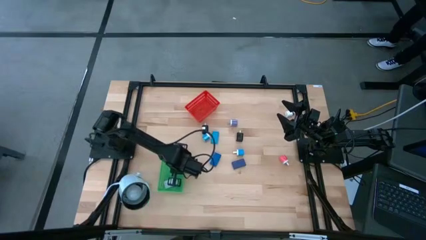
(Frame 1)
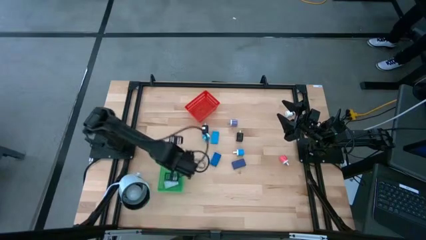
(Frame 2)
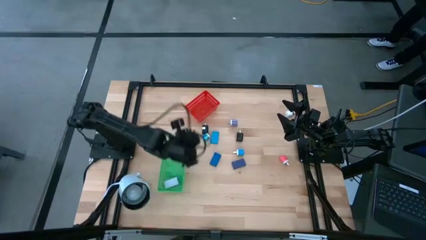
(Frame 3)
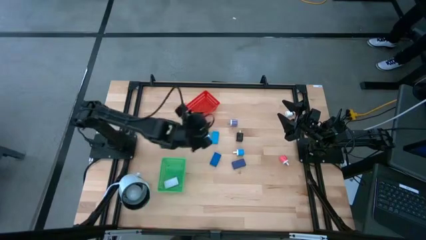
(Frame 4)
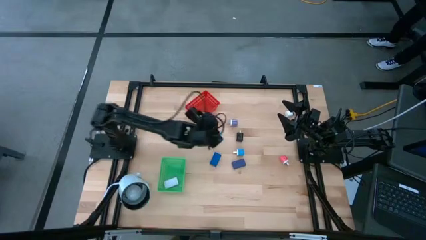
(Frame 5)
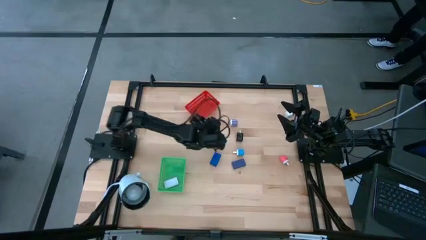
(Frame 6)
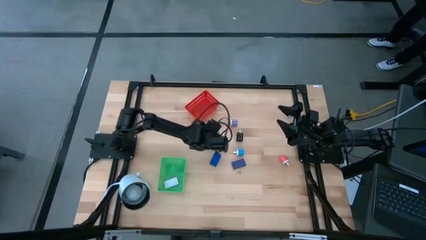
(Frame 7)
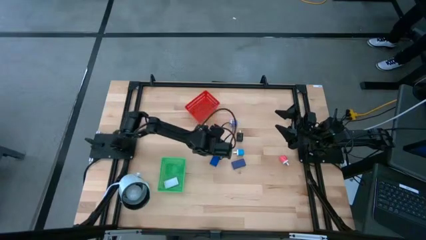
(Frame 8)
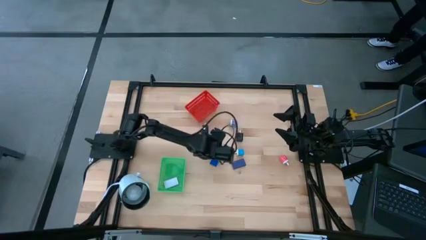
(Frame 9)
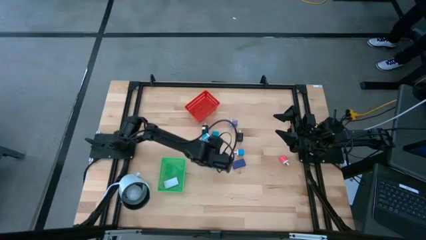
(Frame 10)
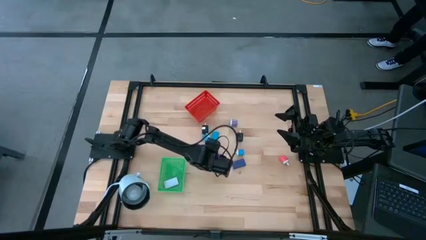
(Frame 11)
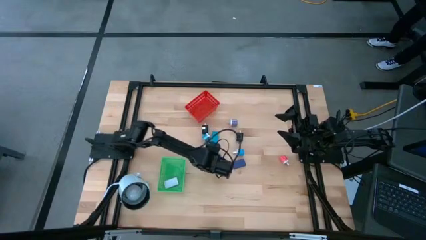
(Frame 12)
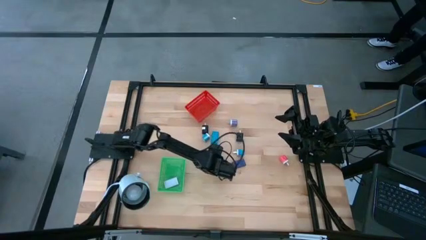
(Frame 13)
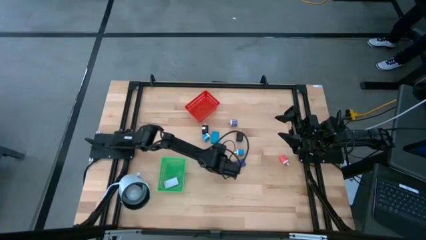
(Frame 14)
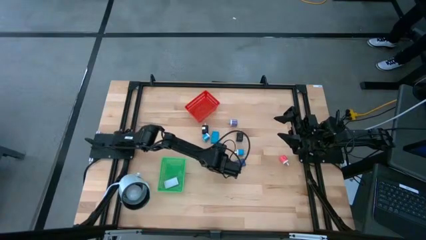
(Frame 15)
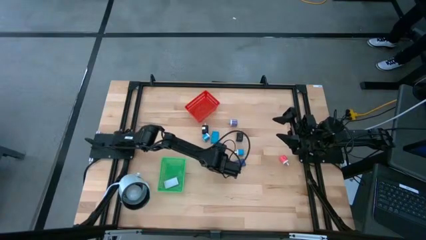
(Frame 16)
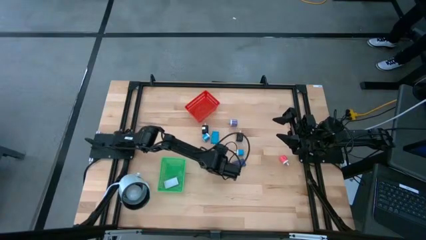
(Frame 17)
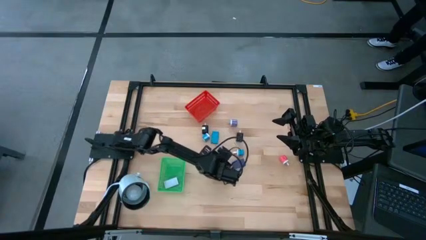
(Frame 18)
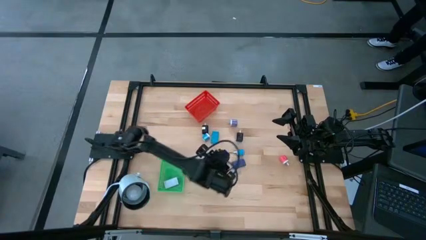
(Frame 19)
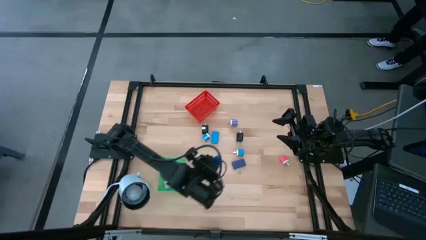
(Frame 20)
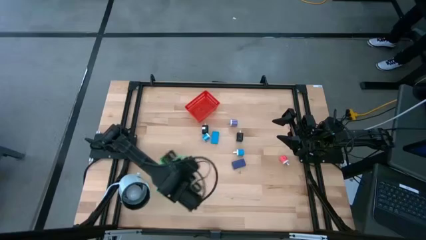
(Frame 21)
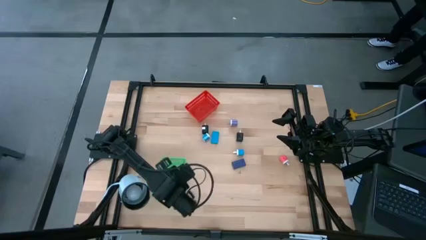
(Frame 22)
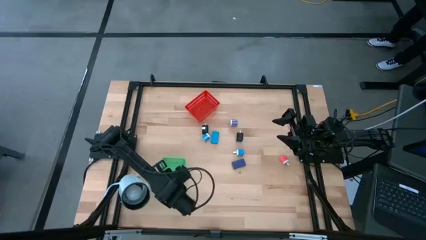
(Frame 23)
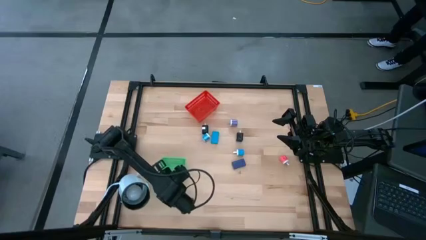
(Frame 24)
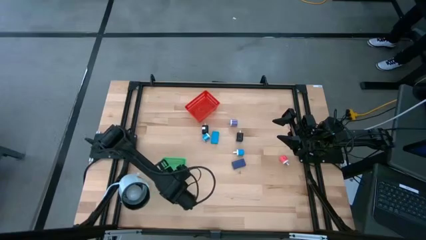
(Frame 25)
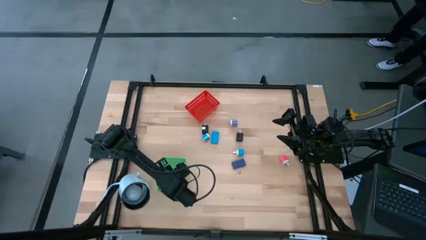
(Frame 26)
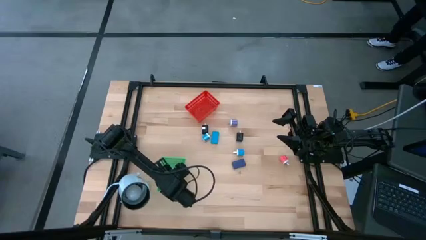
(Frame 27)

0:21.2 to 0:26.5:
Task: Pick & Place Office items
Put the left blue digital clock into the green bin

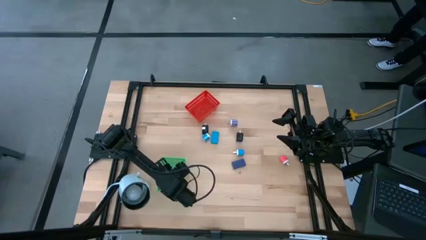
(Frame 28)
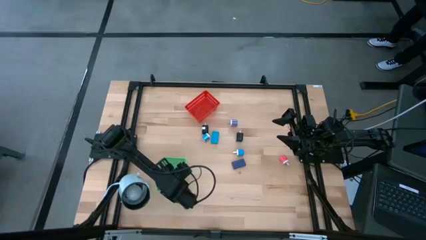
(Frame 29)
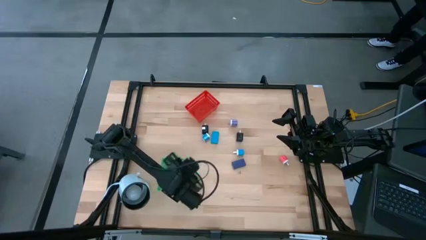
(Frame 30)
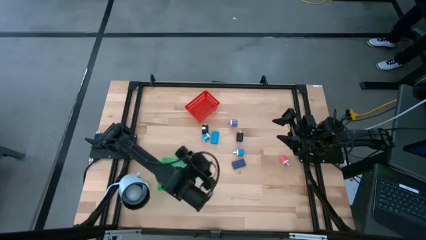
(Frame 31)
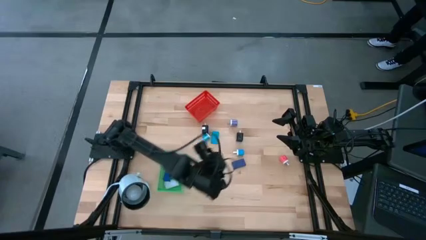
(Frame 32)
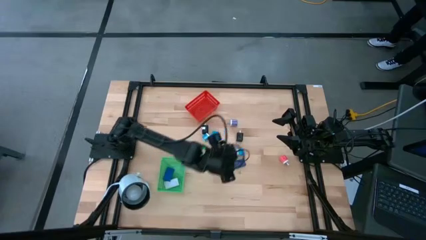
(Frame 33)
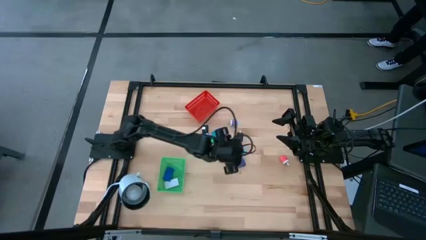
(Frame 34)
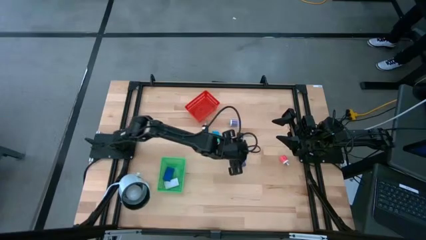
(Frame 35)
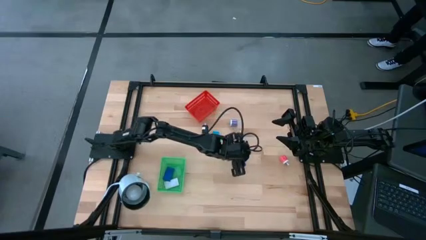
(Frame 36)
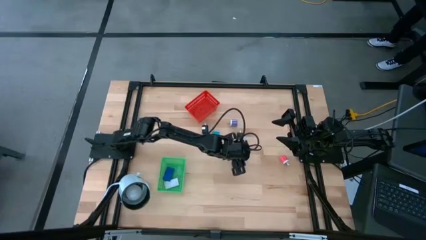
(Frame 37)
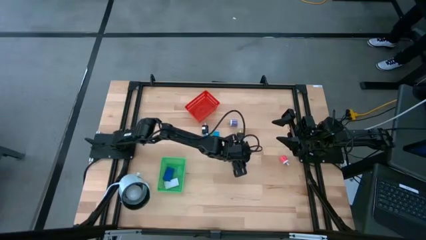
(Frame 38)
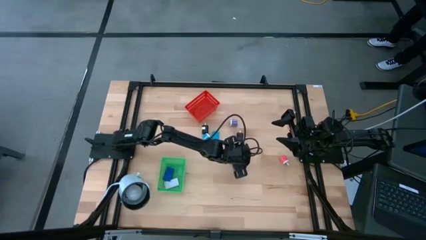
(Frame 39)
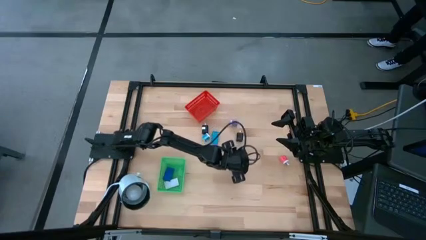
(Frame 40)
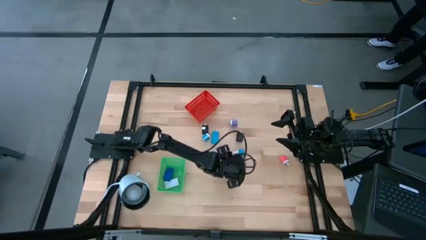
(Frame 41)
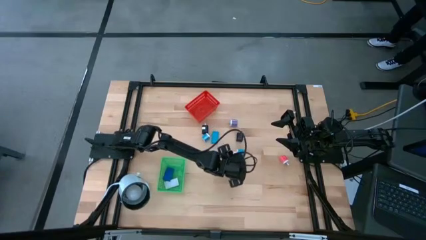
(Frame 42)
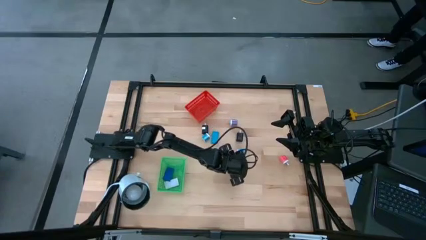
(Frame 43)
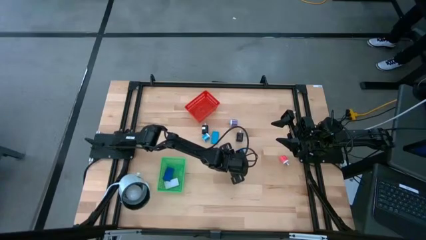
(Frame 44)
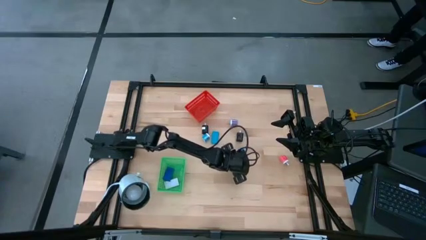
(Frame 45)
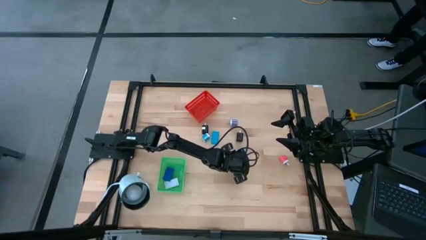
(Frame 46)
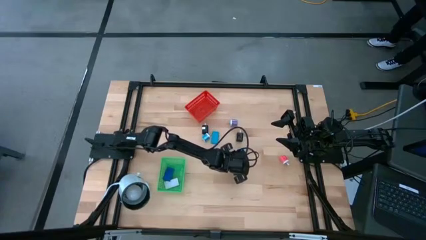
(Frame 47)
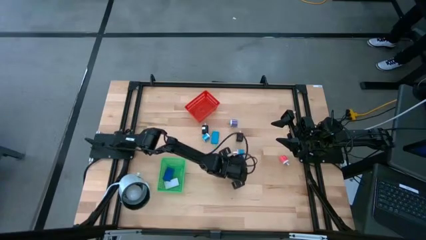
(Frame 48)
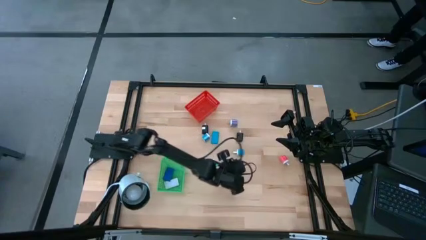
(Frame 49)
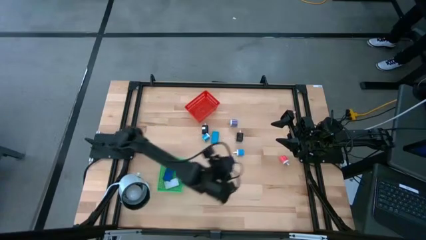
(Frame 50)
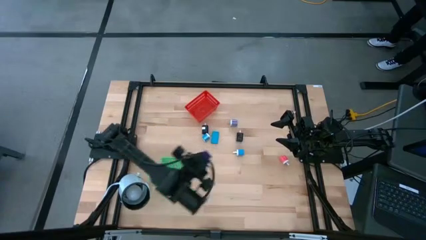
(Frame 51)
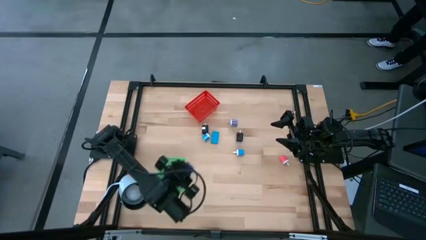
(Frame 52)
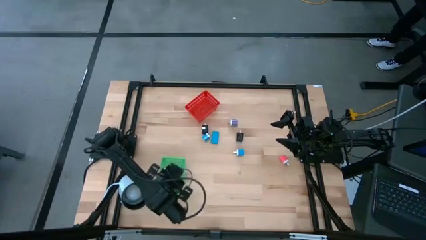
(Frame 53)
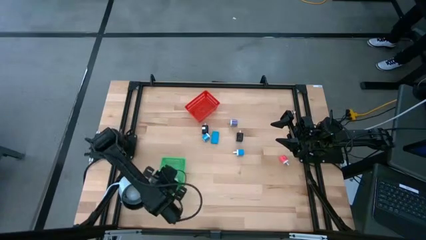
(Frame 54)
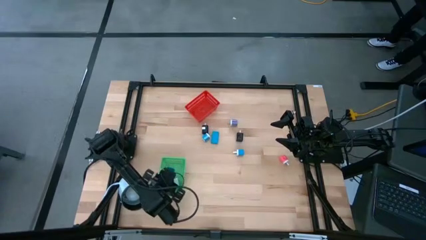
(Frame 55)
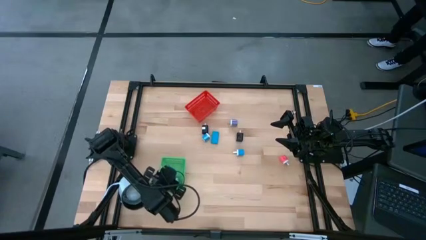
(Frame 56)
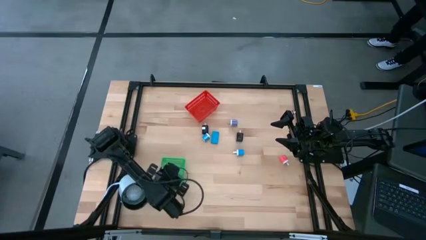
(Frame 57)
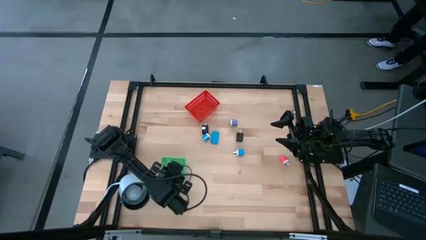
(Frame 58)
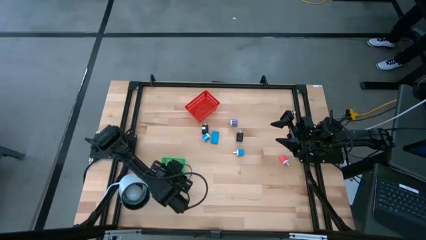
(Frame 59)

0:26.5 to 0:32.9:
Put the blue digital clock into the green bin

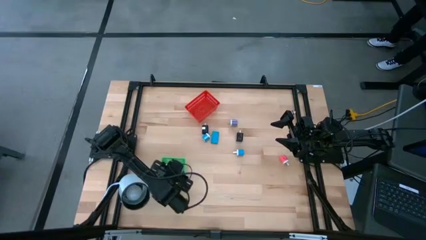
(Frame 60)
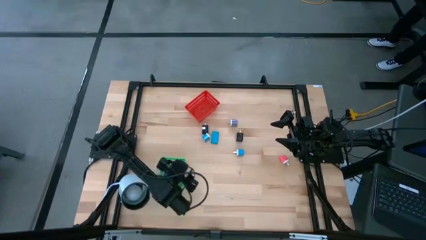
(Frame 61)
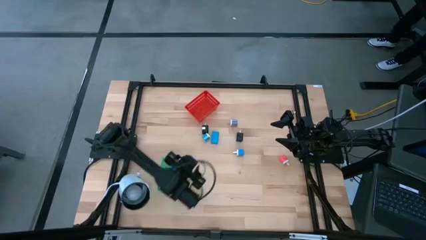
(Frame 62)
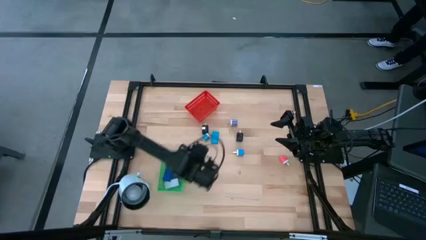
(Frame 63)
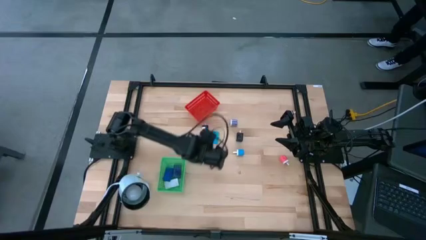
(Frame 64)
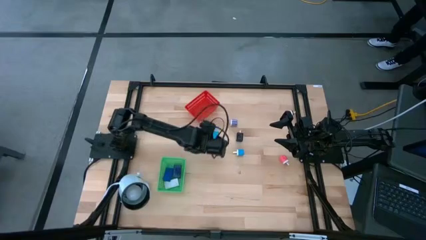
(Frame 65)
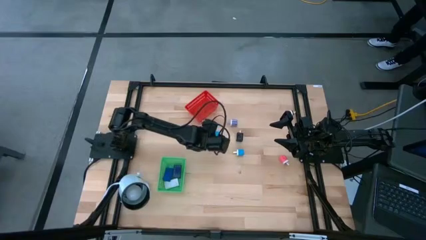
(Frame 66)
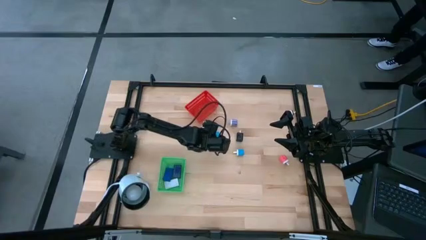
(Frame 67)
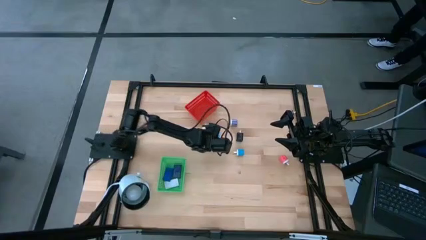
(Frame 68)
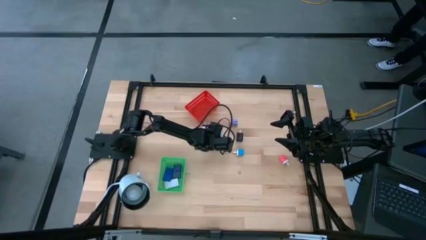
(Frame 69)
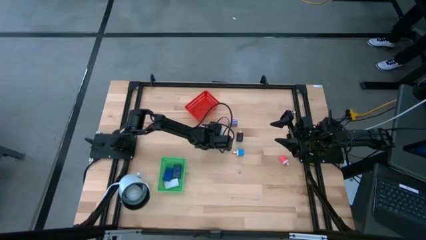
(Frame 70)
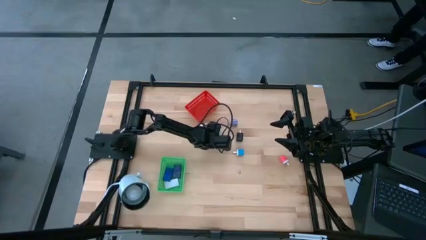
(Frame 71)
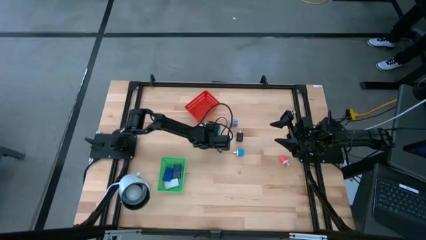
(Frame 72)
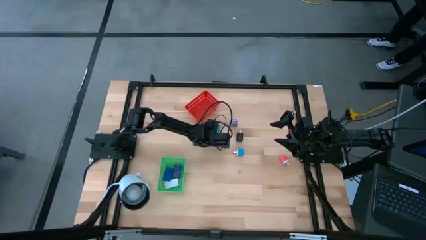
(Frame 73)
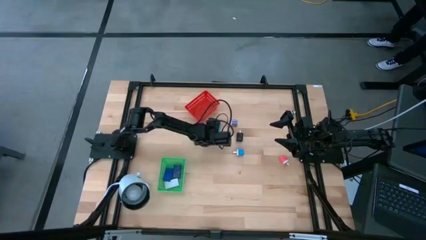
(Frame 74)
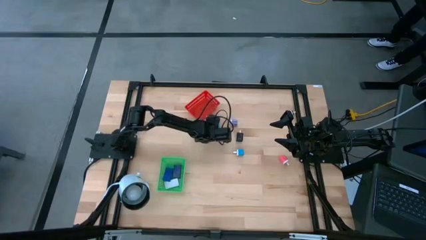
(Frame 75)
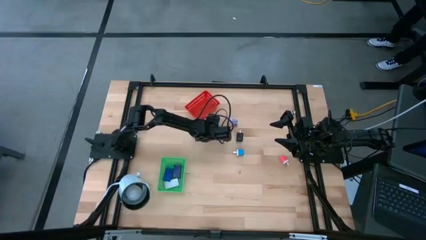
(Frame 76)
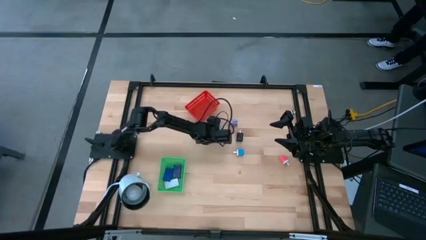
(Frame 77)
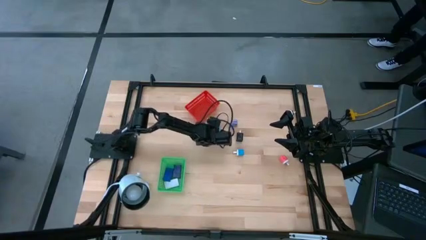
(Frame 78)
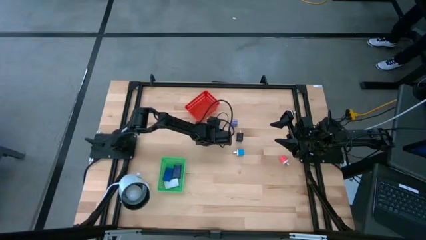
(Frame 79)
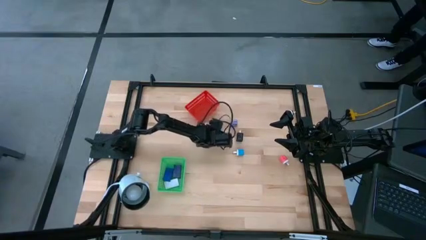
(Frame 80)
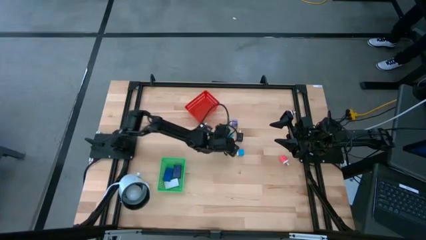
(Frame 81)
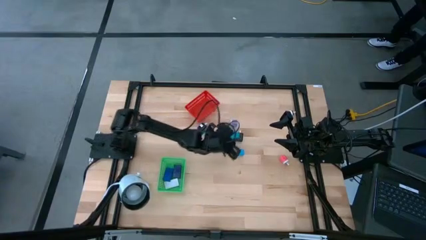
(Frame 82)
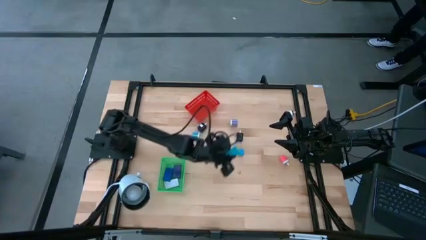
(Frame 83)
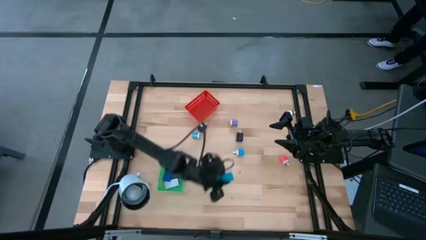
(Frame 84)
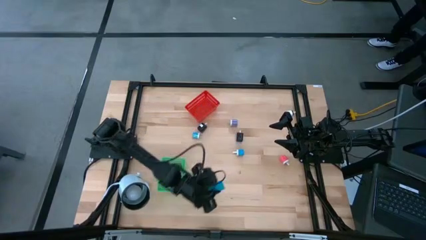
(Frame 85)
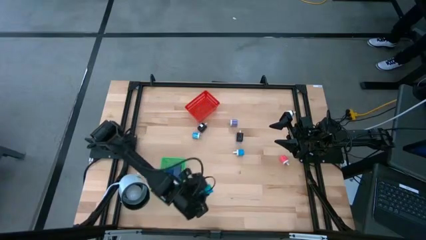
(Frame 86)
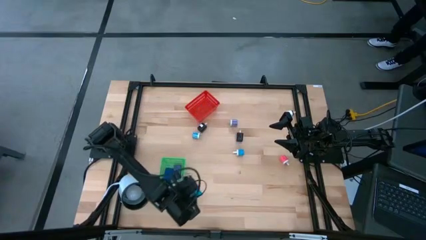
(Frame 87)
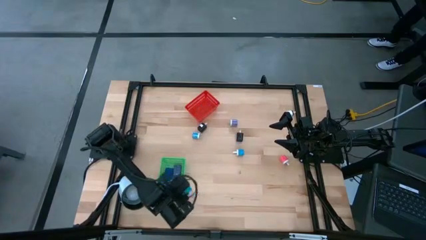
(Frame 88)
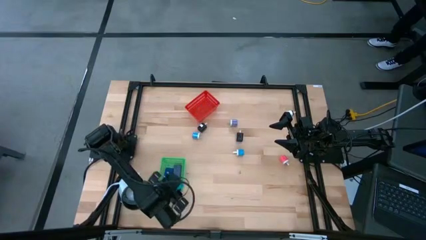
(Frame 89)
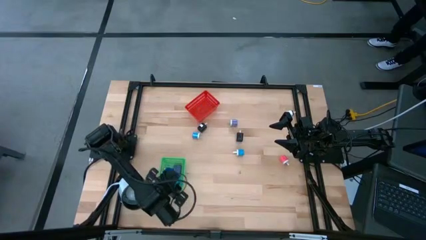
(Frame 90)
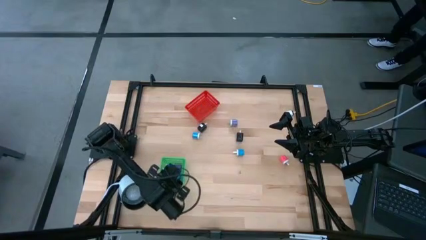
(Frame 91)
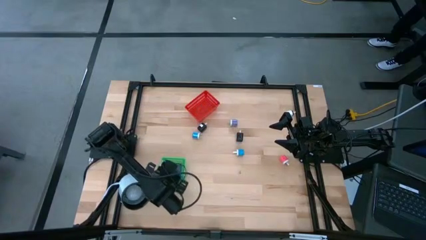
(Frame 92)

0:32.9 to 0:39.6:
Put the light blue digital clock into the green bin
